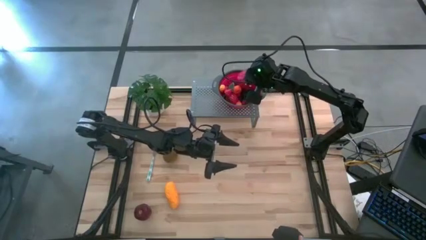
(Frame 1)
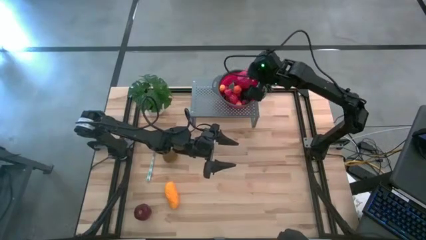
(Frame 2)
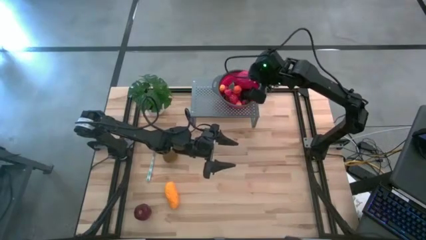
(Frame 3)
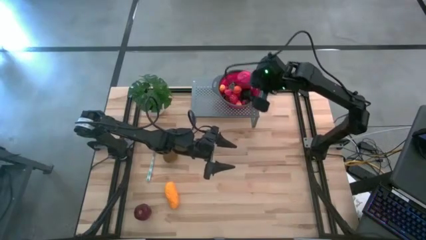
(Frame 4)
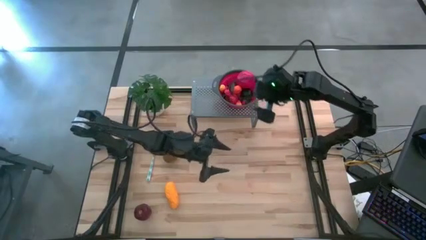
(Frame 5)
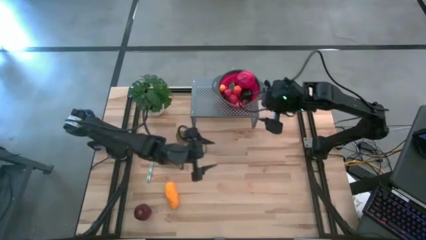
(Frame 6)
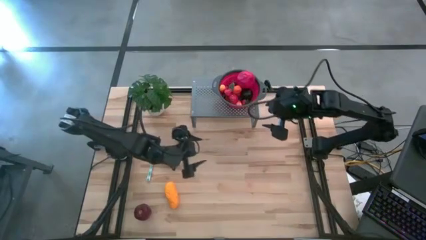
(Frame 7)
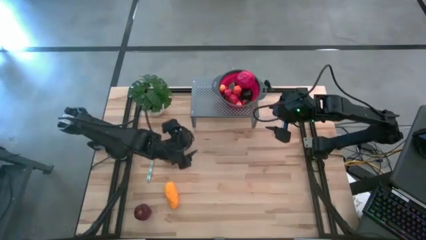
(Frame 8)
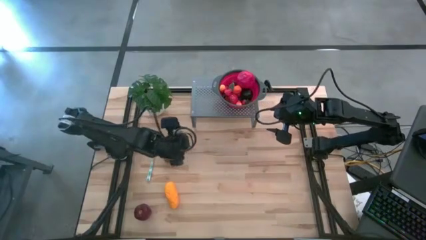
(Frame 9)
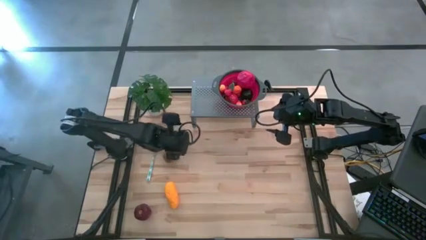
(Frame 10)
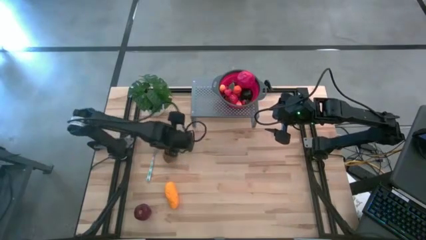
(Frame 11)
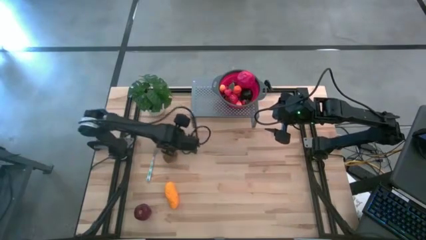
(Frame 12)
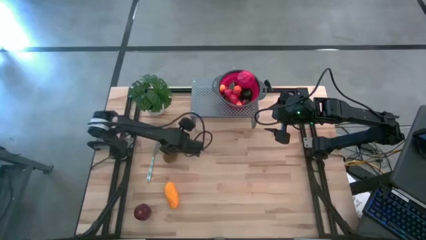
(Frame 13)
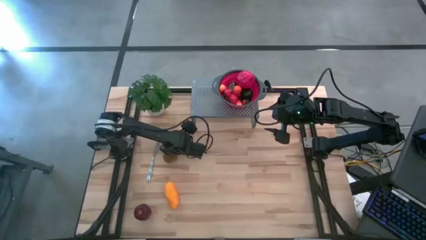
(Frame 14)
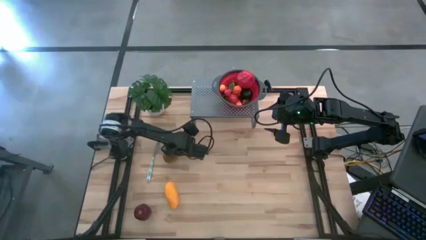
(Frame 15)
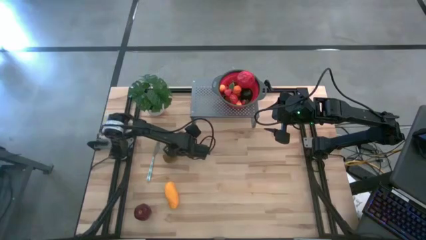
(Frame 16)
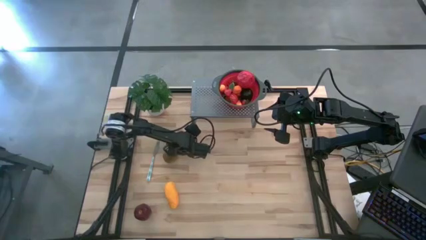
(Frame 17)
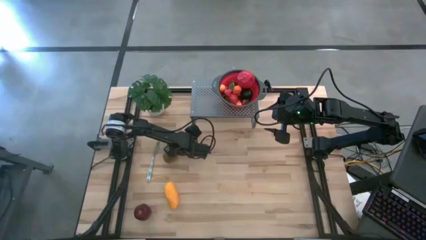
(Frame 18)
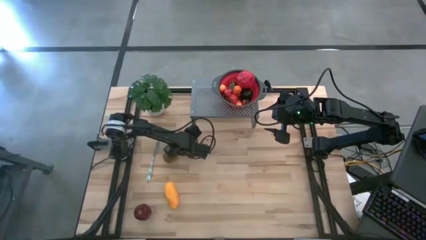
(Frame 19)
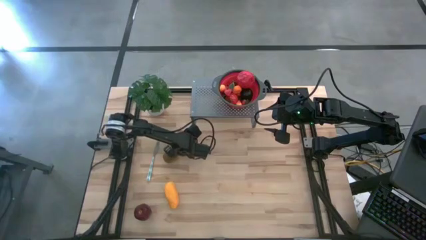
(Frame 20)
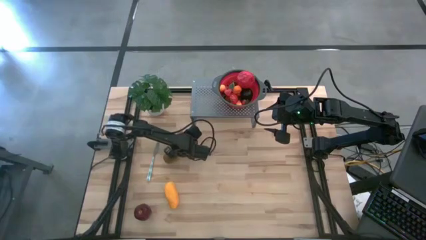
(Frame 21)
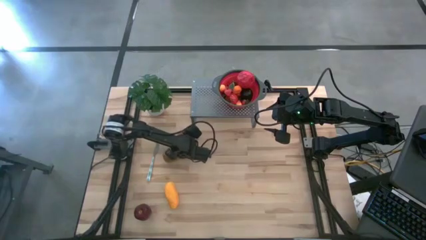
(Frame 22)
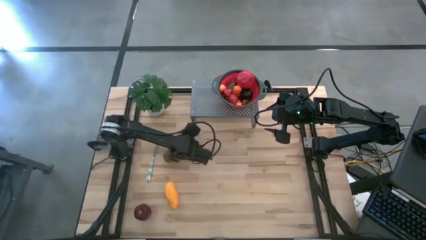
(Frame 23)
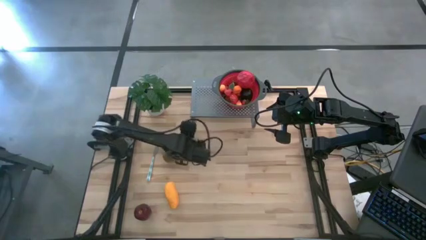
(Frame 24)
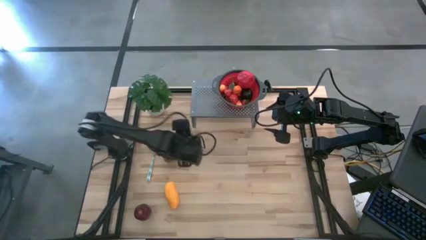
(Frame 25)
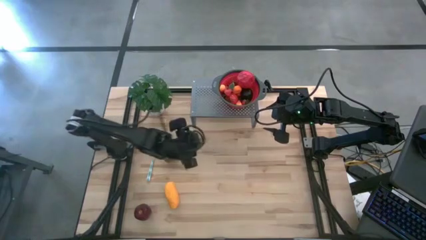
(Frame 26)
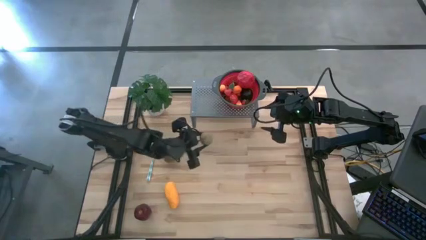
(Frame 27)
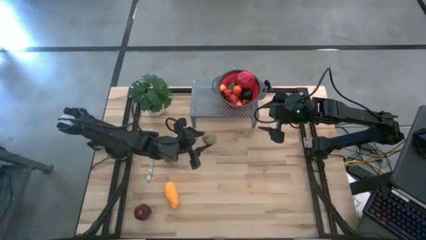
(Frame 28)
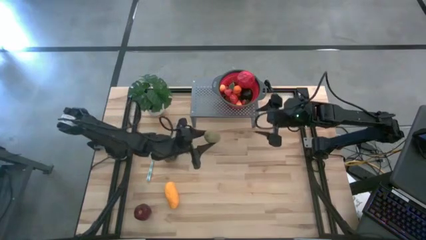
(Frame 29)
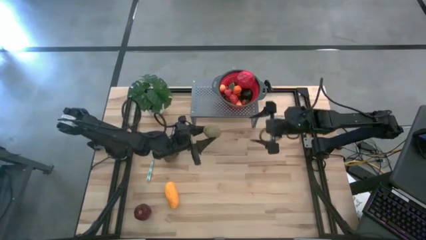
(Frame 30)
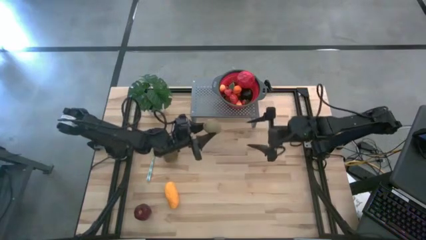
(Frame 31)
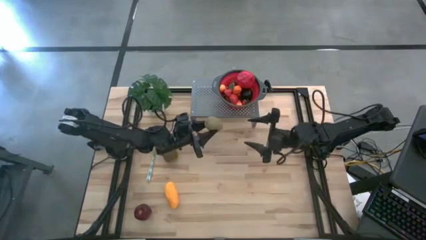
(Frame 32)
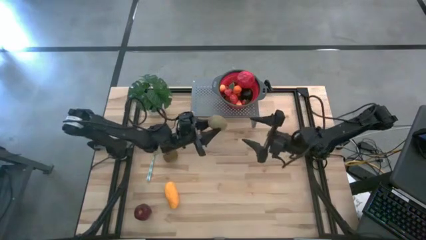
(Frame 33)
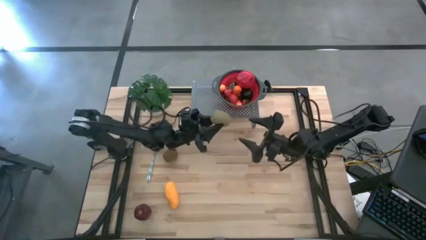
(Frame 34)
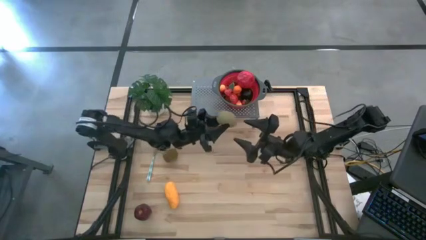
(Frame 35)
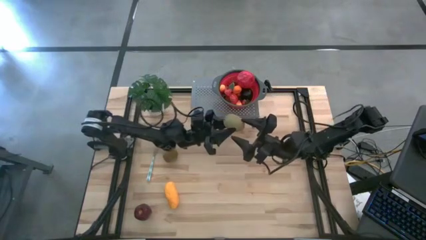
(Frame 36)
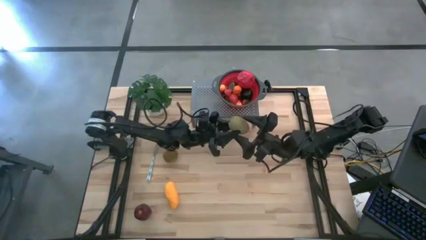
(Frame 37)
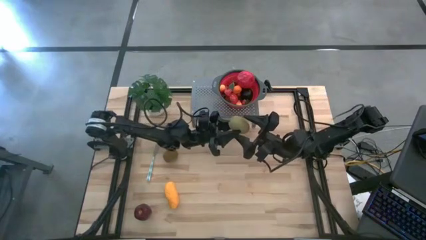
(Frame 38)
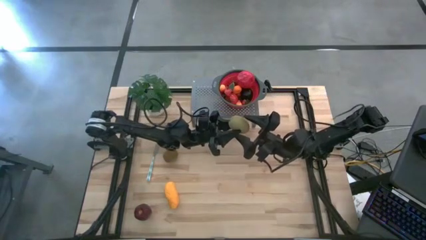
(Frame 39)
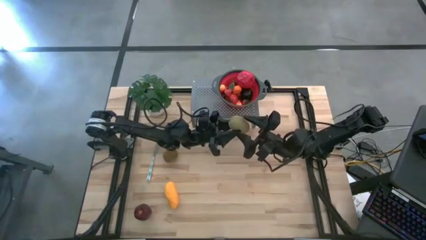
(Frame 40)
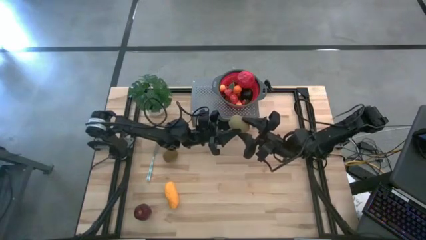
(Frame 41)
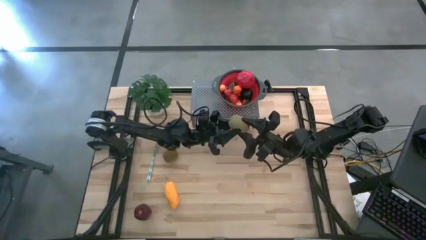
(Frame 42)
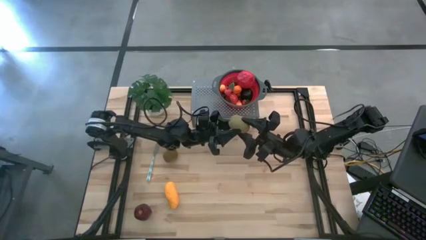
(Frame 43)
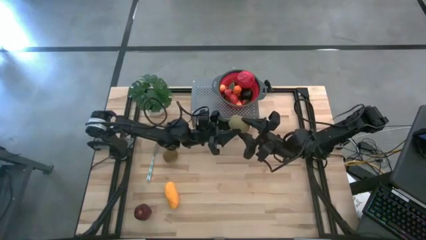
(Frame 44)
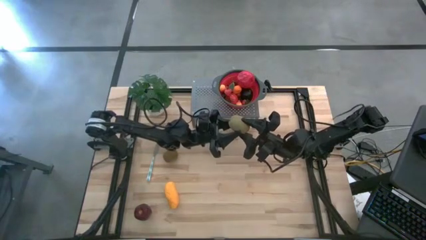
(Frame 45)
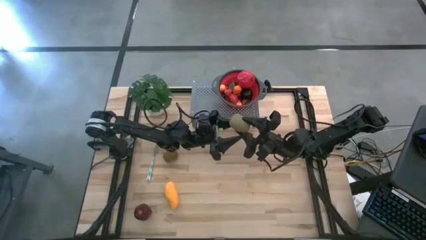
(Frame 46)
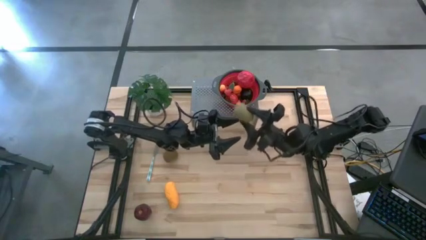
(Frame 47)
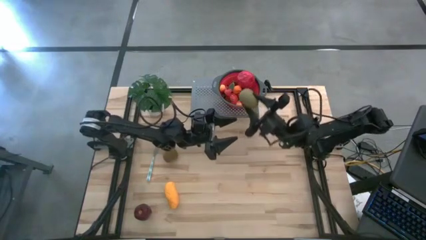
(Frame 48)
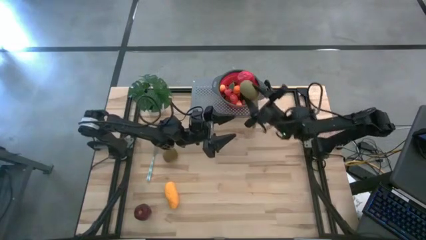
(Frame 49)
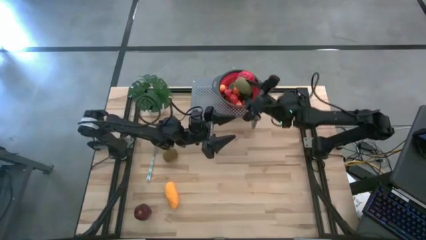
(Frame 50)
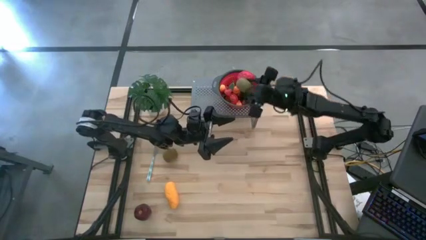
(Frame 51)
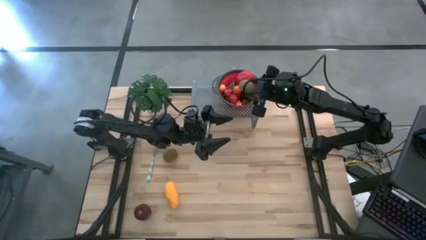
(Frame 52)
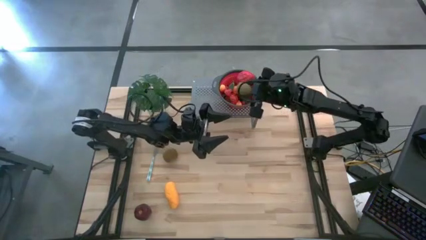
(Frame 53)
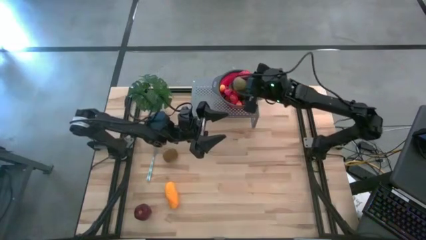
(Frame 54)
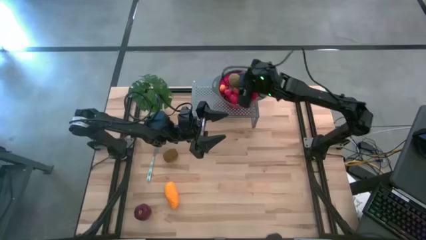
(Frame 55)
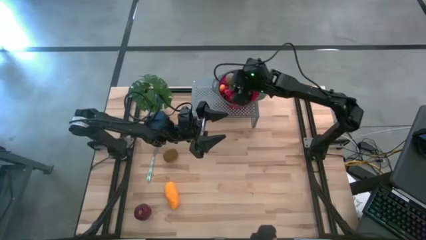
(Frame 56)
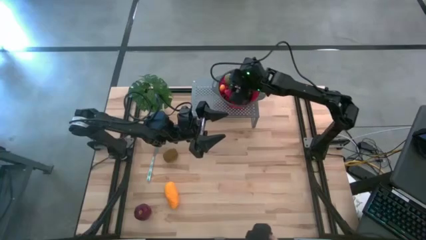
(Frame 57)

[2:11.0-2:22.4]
Task: Pick & Place Fruit
Put the kiwi into the strainer bowl on the shelf
